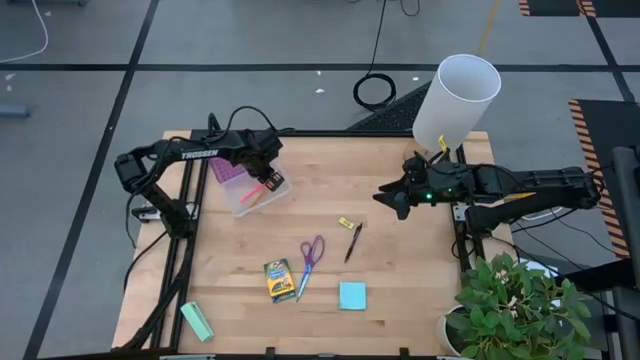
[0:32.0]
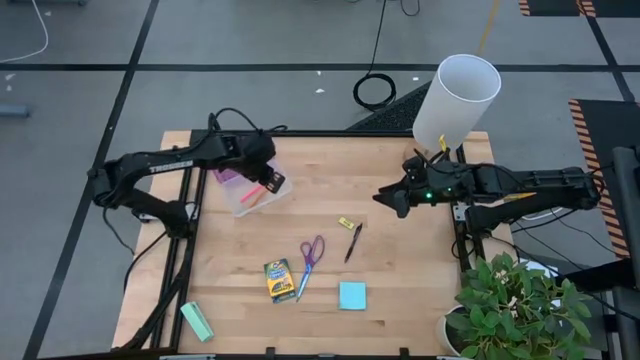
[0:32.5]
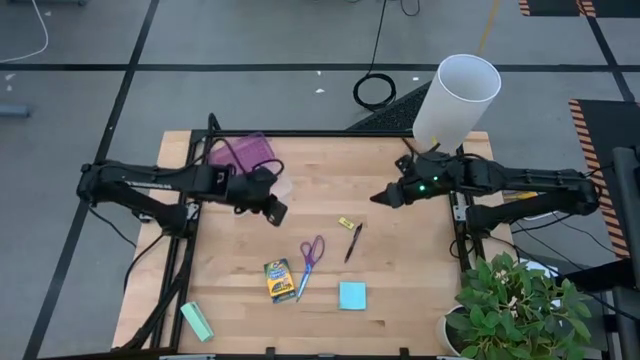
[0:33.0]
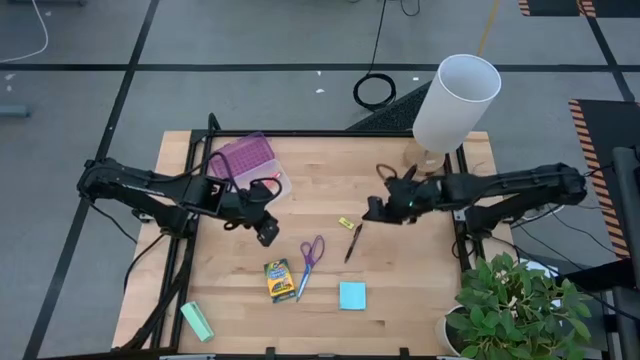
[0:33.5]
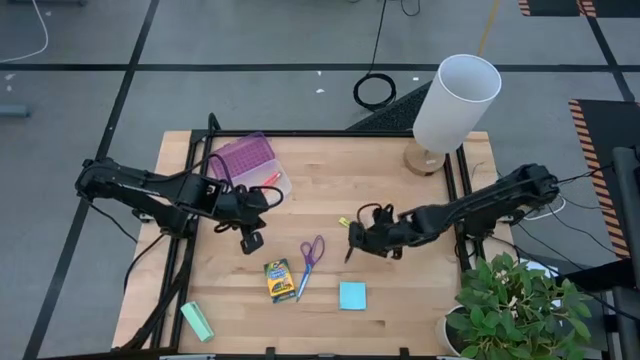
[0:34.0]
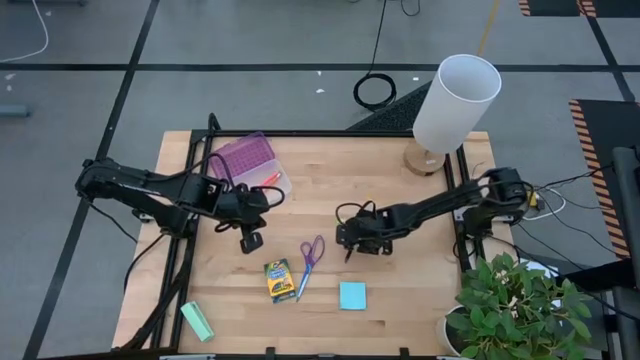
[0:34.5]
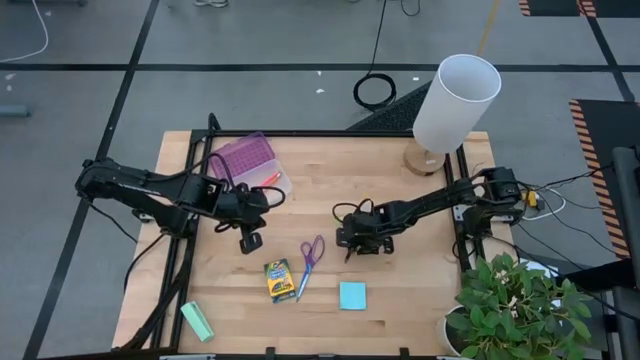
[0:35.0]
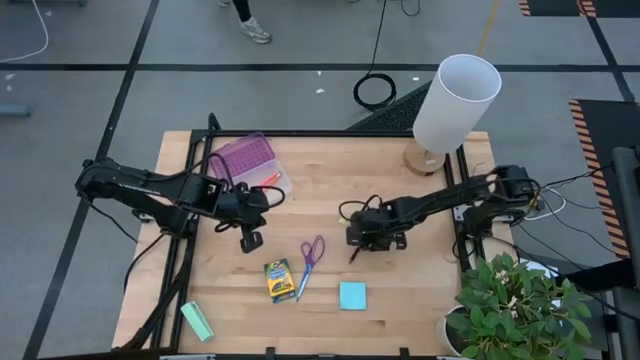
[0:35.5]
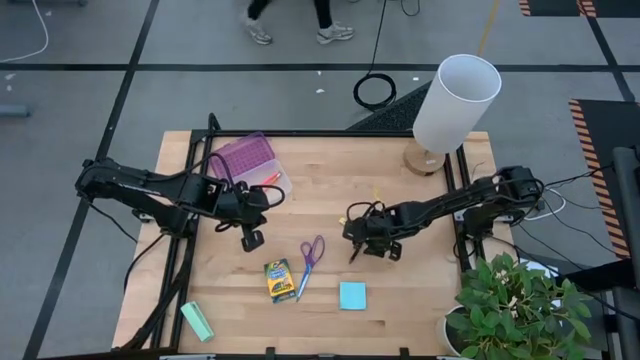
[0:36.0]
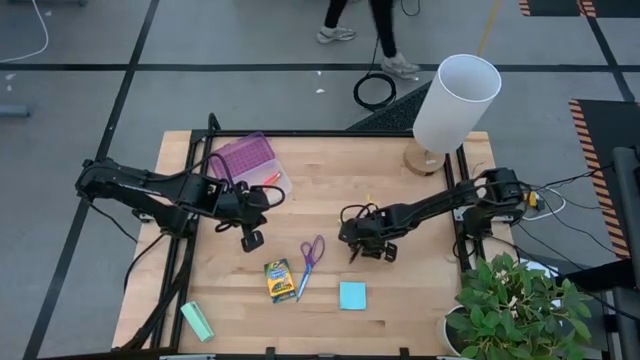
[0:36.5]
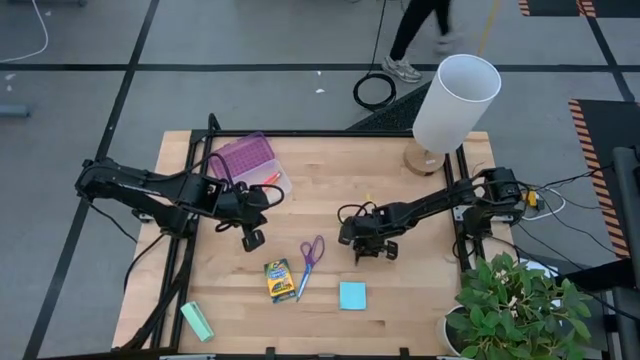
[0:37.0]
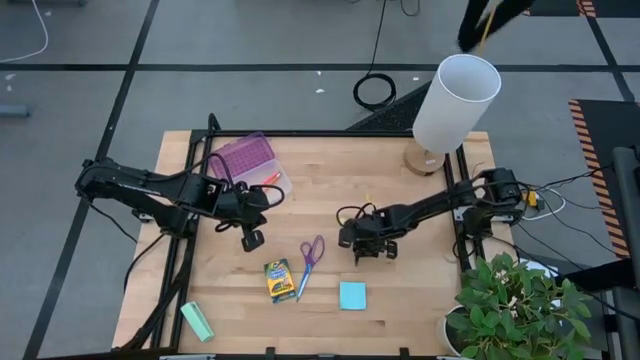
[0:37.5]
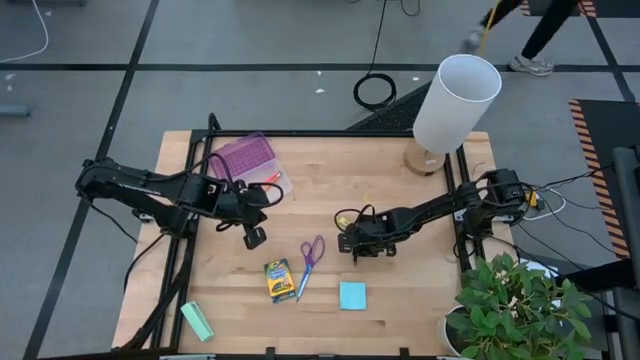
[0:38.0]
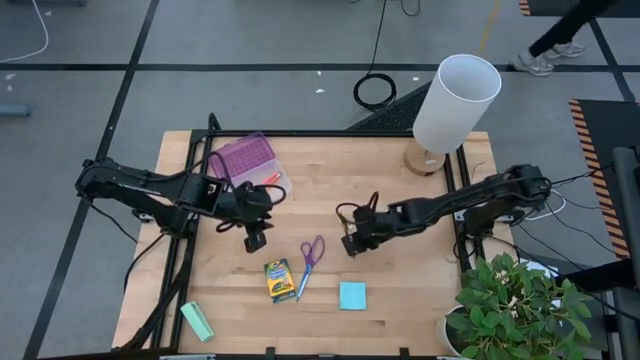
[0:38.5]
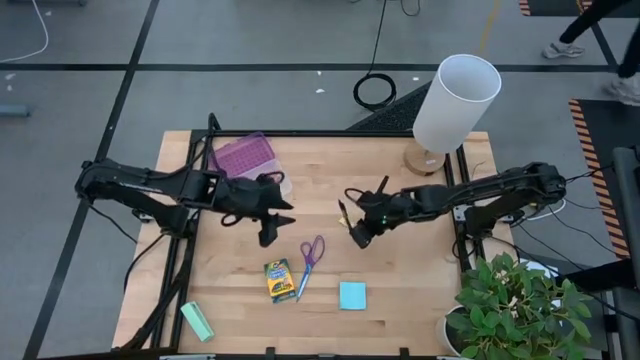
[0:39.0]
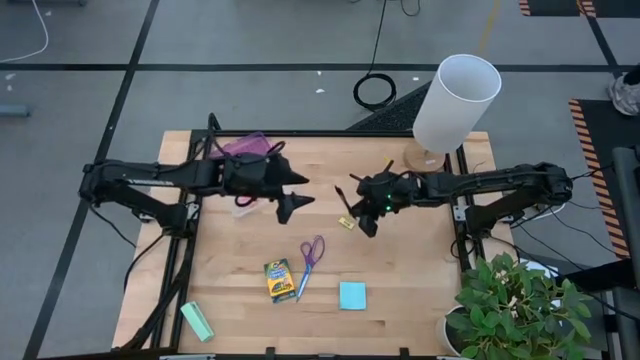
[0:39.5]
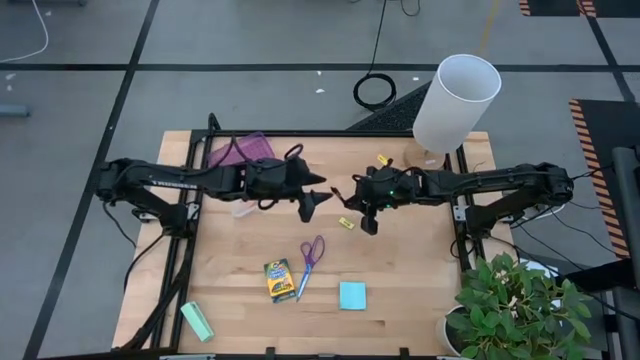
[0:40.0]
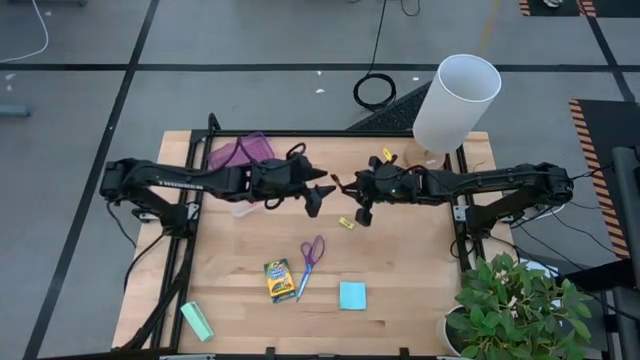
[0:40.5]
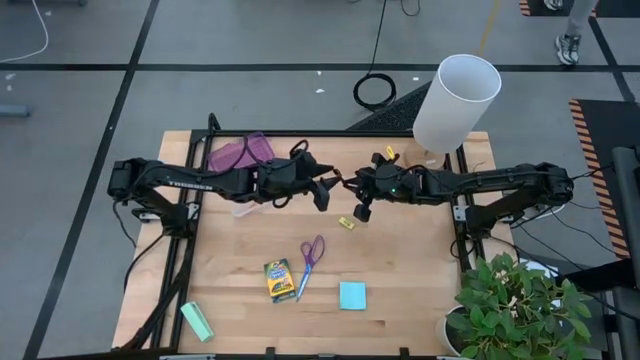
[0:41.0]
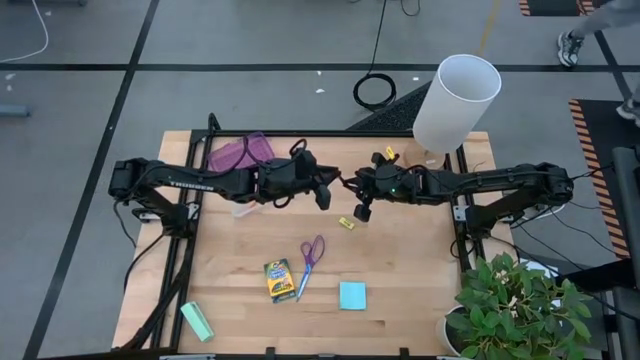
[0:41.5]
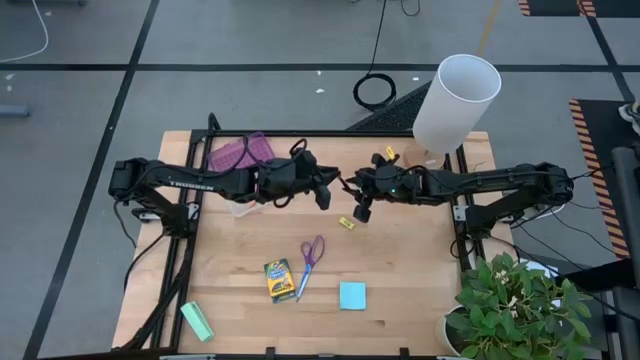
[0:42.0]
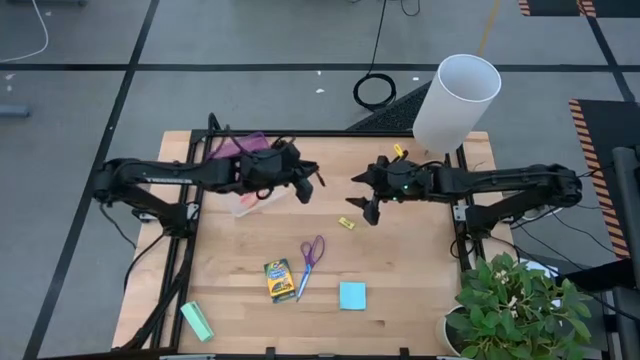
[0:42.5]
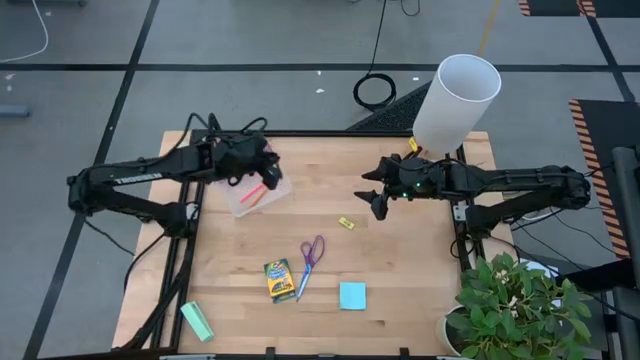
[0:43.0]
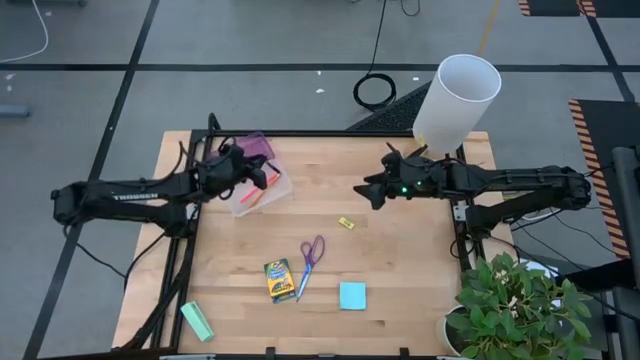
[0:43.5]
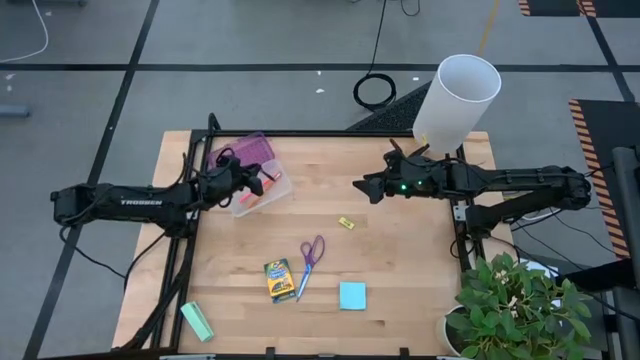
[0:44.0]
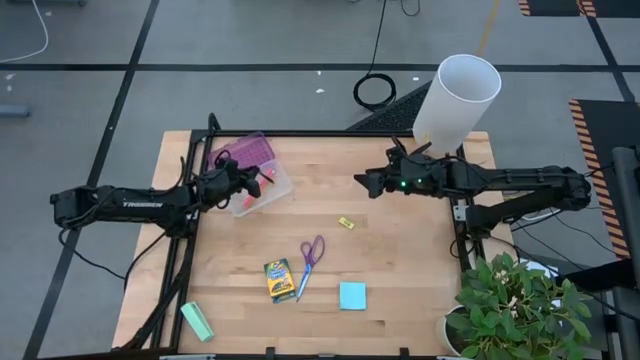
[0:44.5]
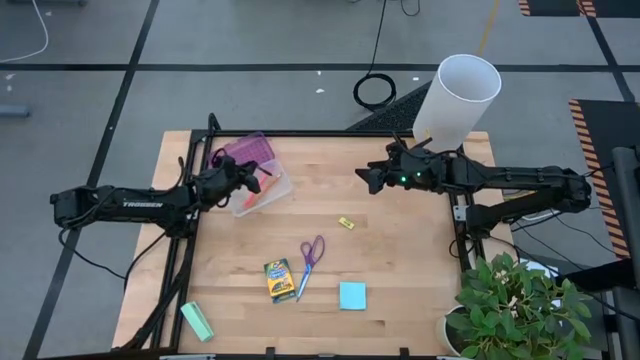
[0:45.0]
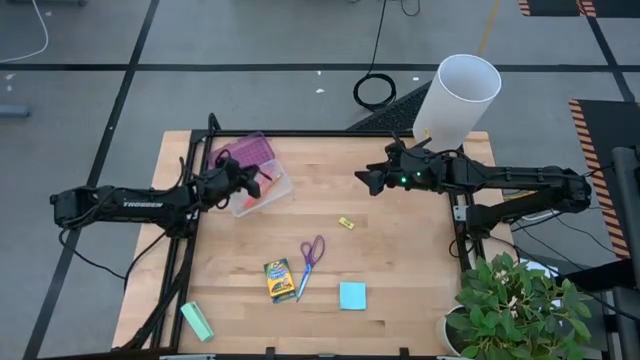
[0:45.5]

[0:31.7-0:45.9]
Task: Pack school essentials
Put the black pen into the supply box

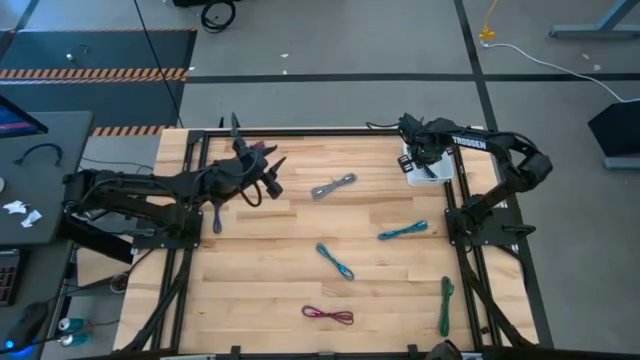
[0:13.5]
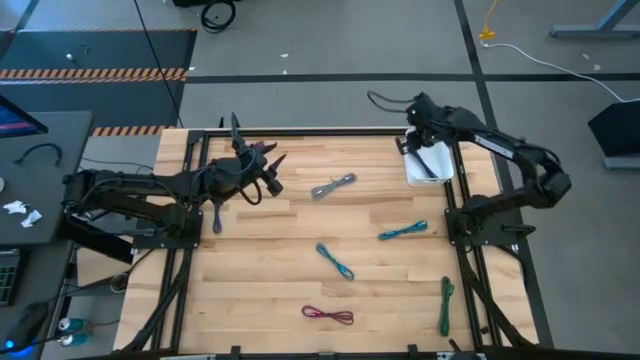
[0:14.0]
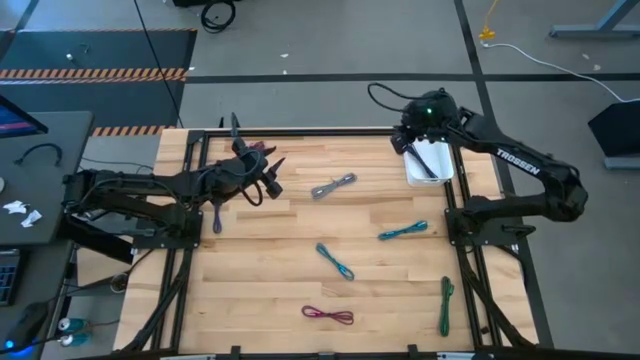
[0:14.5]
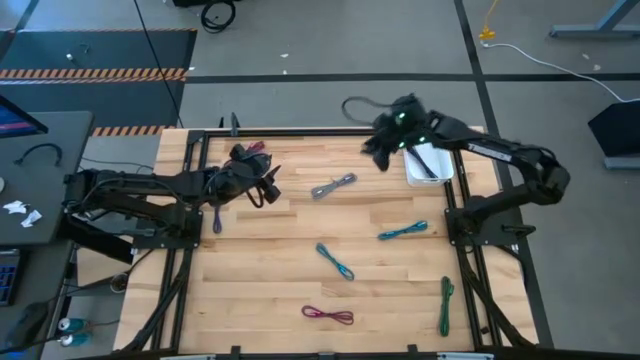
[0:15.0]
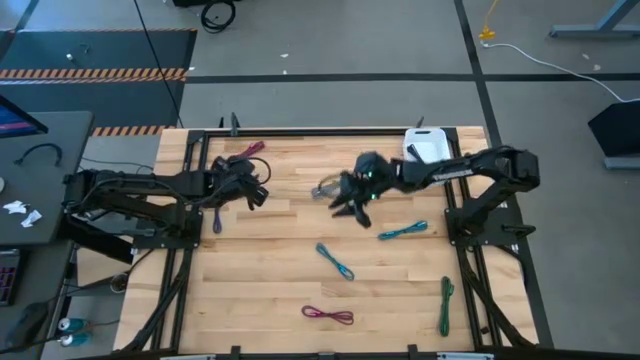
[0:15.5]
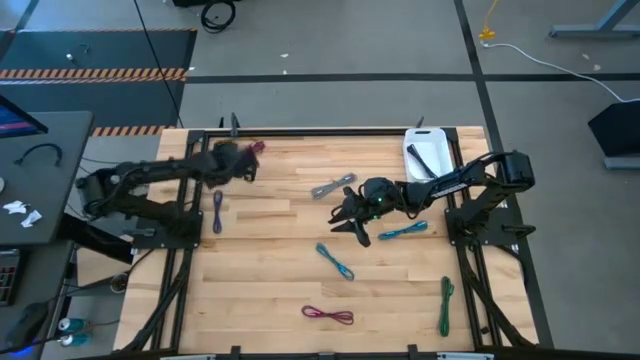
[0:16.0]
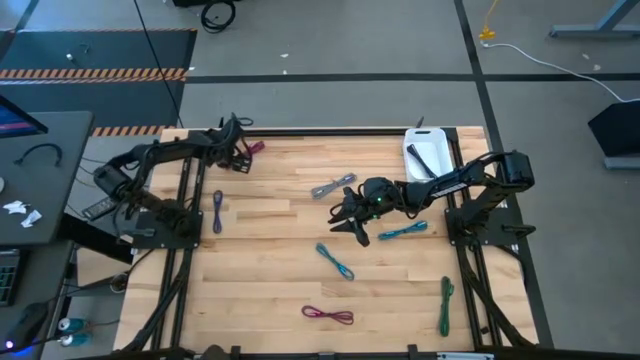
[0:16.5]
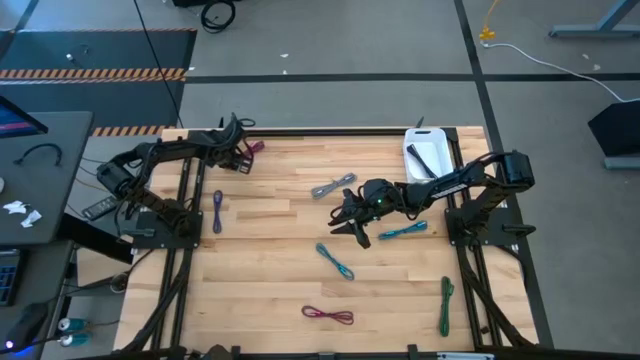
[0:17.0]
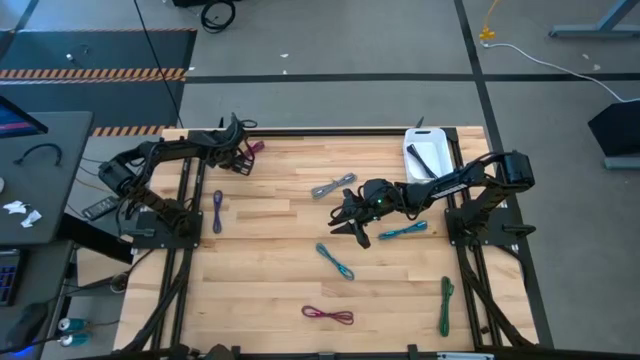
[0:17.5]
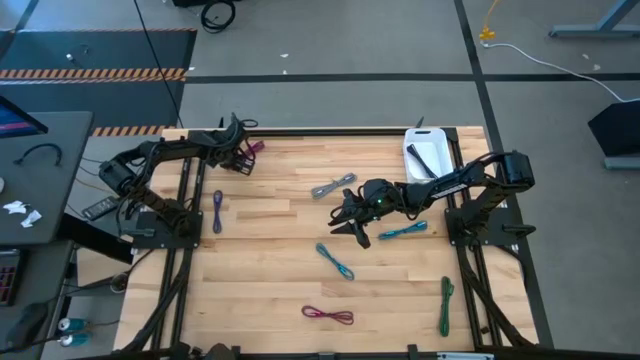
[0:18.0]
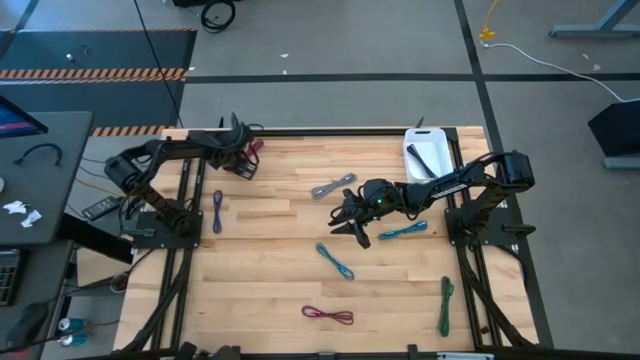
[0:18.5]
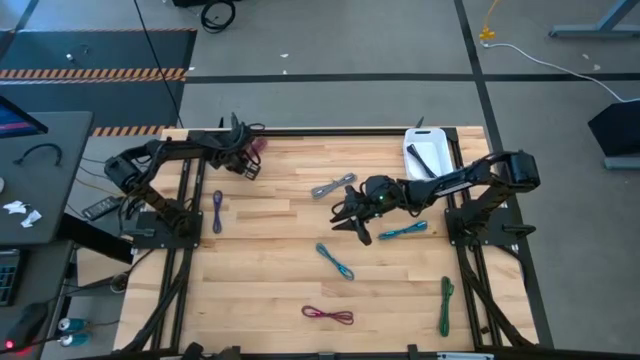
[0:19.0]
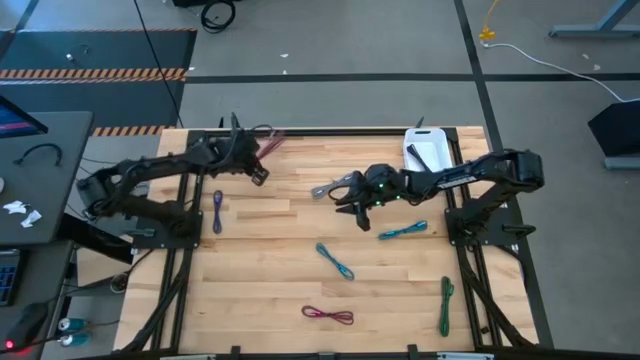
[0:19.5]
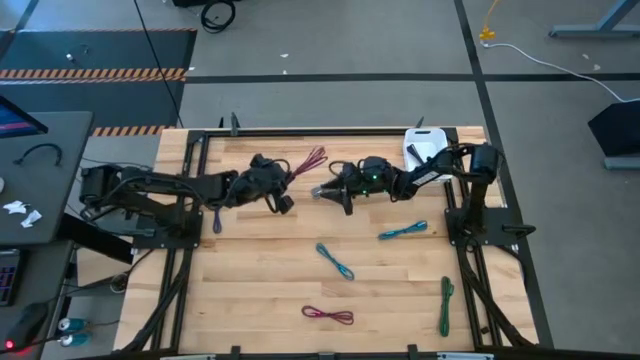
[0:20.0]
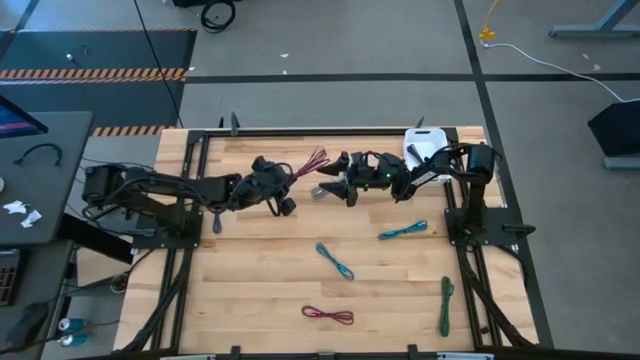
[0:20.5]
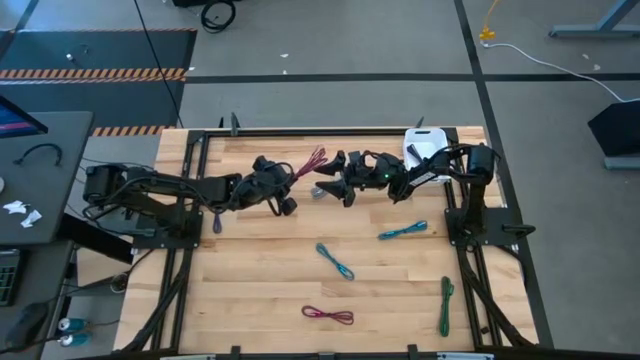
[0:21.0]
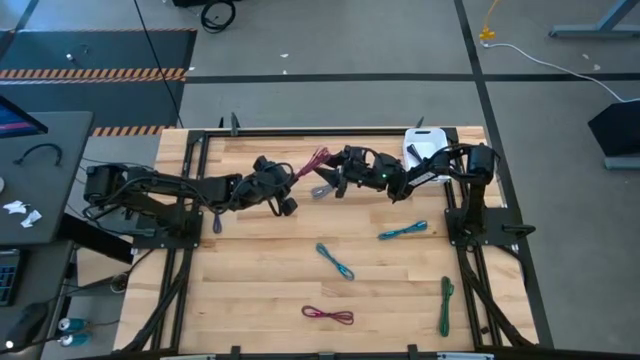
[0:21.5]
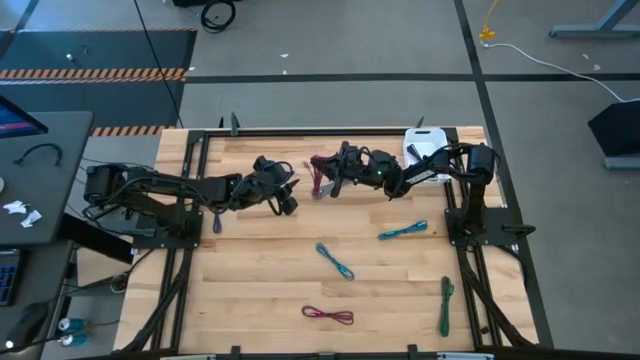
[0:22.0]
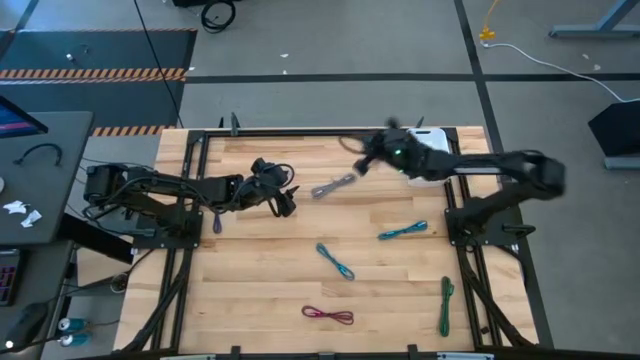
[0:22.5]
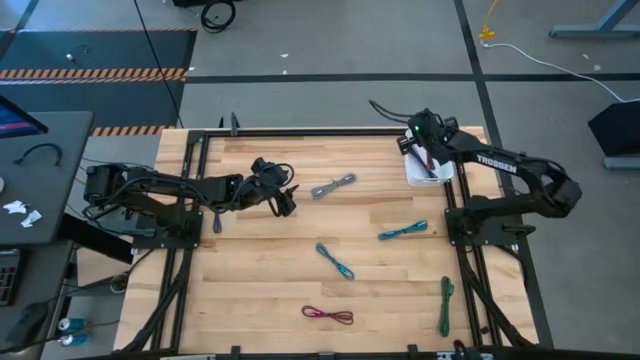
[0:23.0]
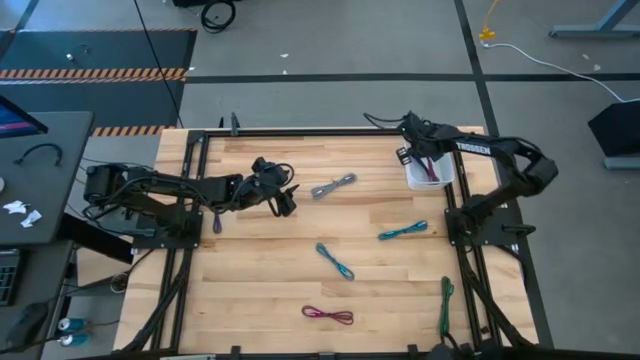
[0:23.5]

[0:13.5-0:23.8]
Task: Pick and place USB-C Cables
Put the top black pink charger cable into the bin
